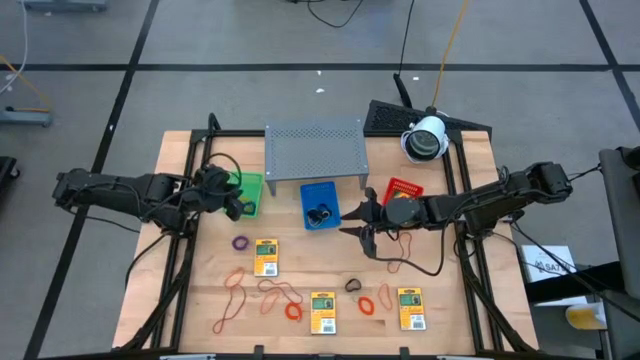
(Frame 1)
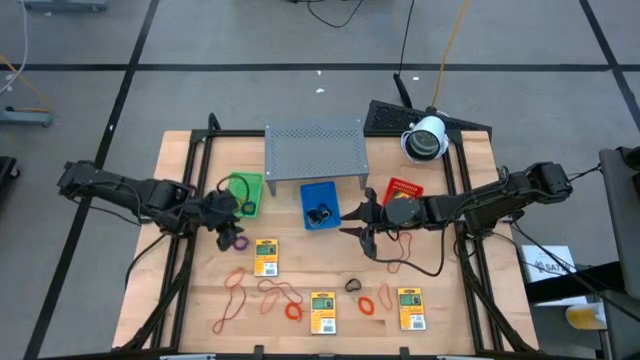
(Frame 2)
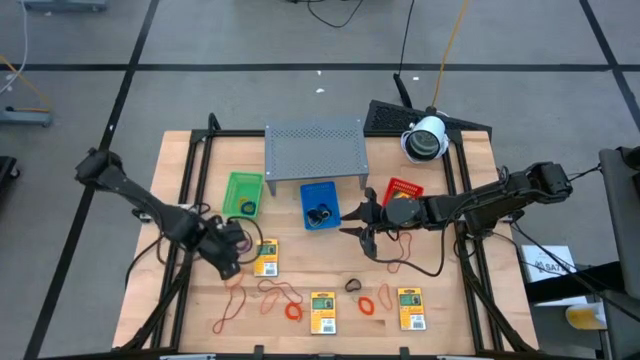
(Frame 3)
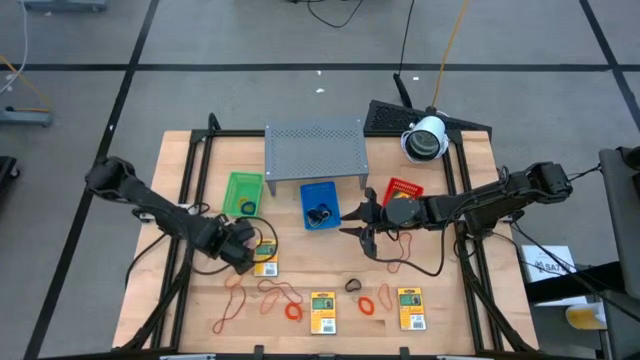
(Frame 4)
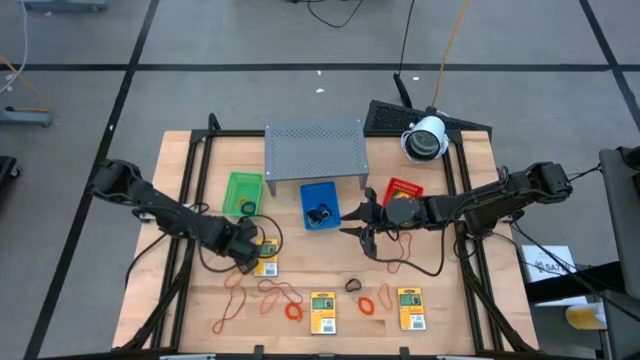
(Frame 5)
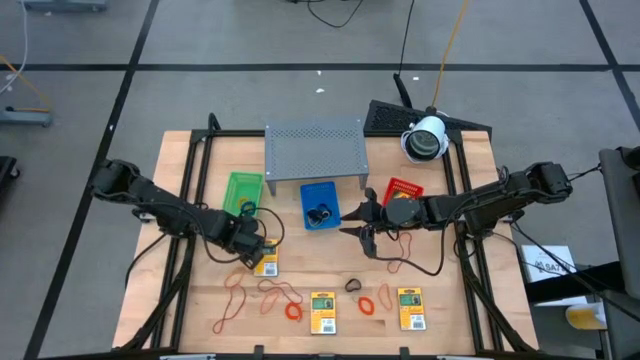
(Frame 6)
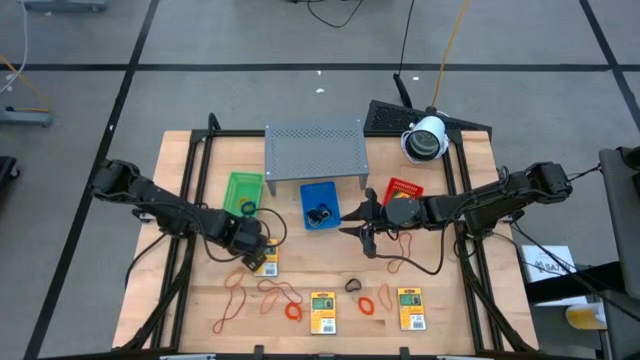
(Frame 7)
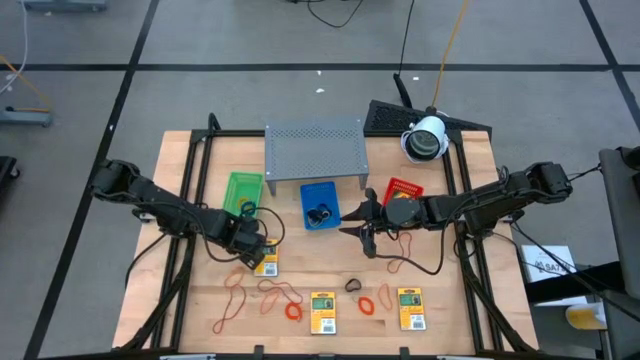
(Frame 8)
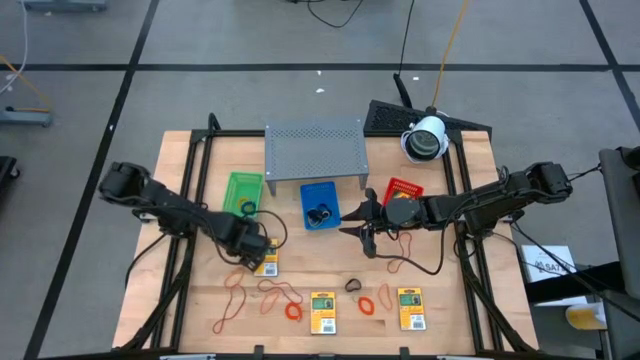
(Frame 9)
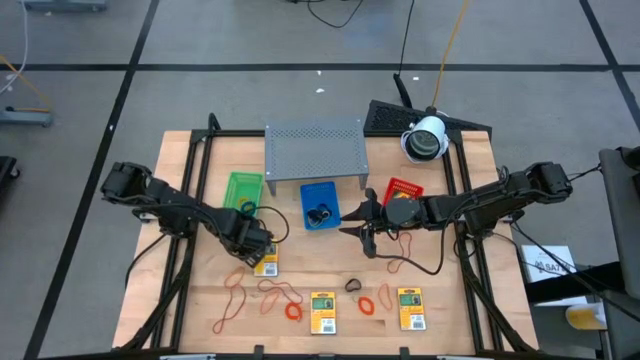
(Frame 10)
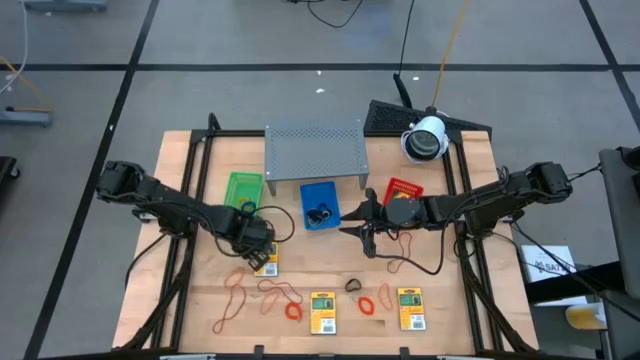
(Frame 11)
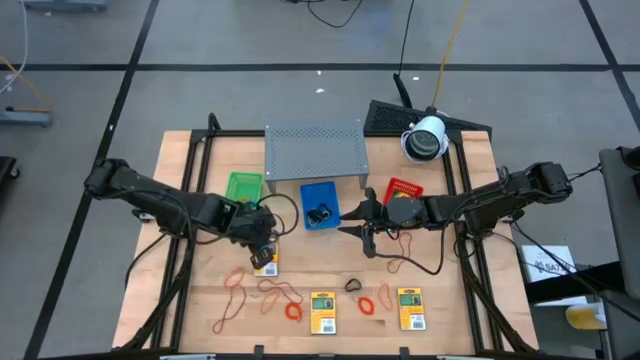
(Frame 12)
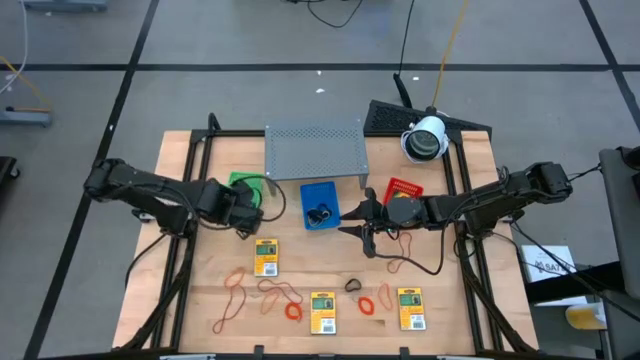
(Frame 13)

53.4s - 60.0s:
Task: Pick & Place Office Desk Supplies
Put the purple spring keychain into the green bin

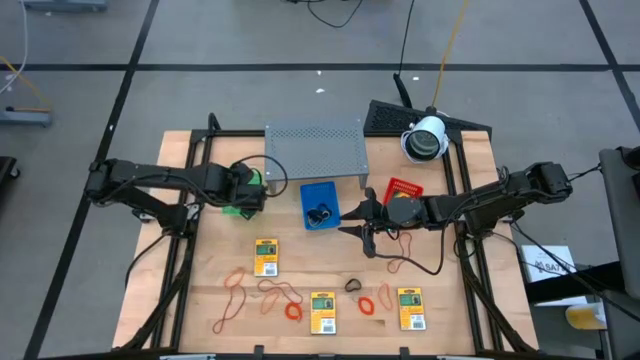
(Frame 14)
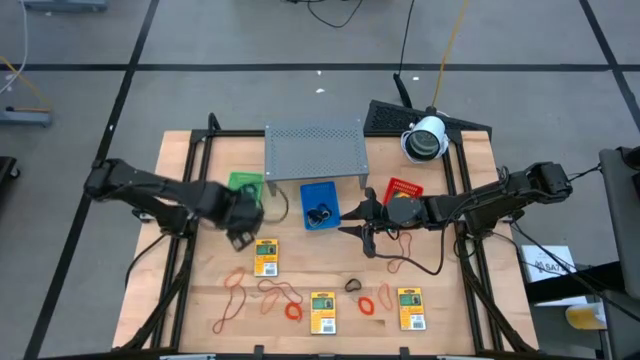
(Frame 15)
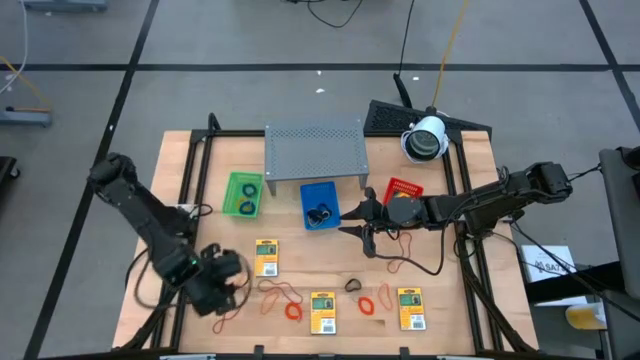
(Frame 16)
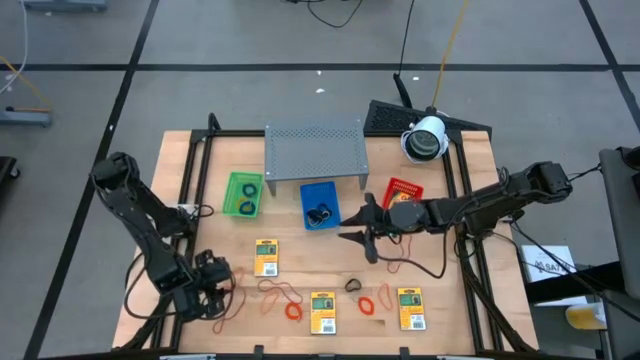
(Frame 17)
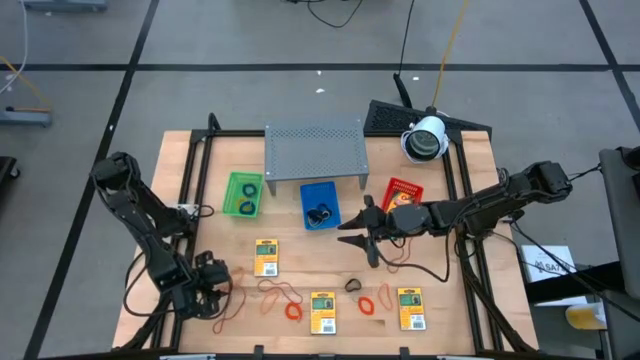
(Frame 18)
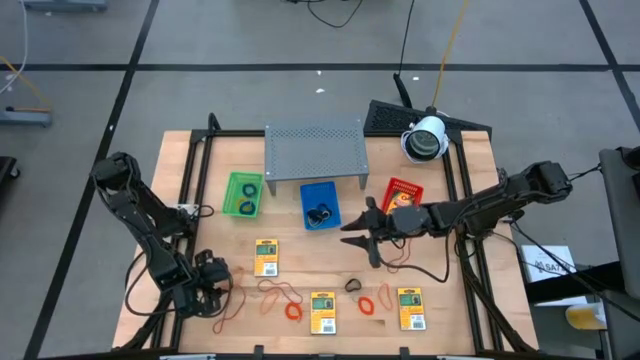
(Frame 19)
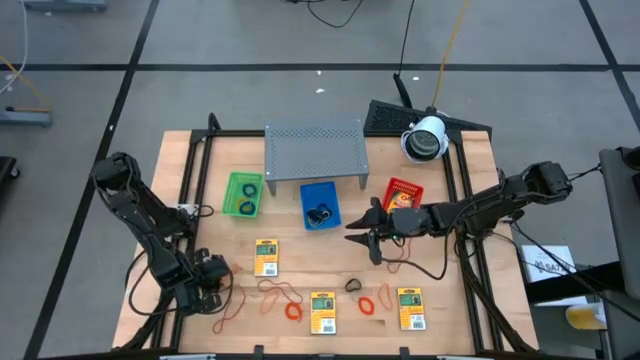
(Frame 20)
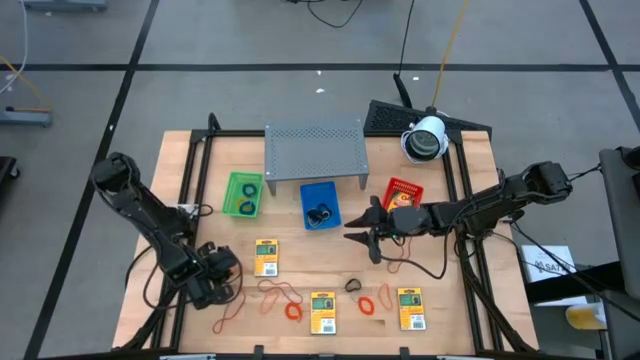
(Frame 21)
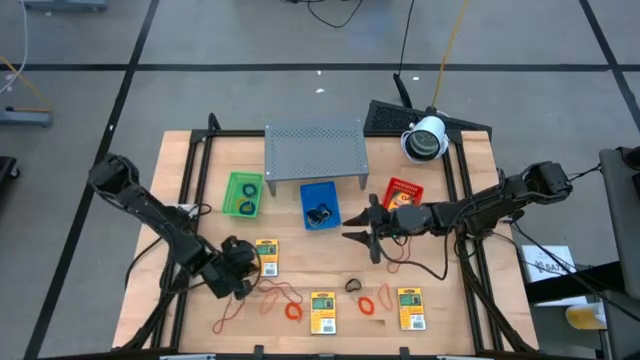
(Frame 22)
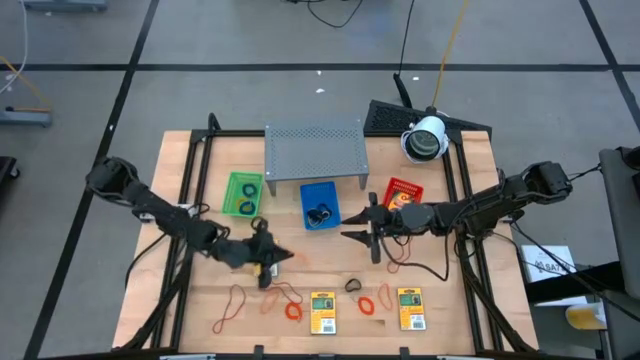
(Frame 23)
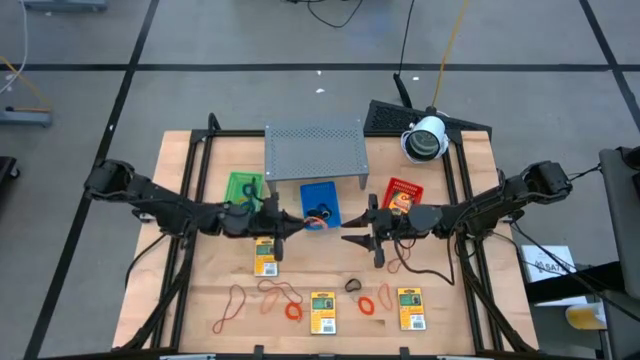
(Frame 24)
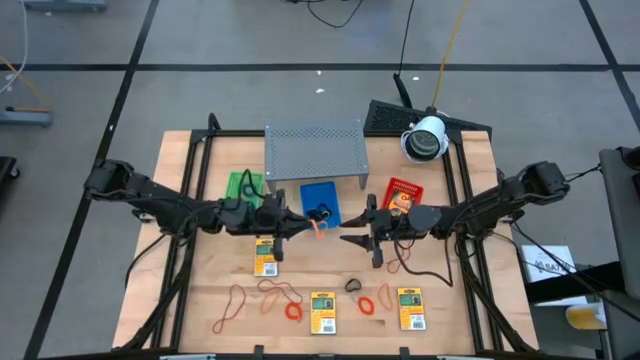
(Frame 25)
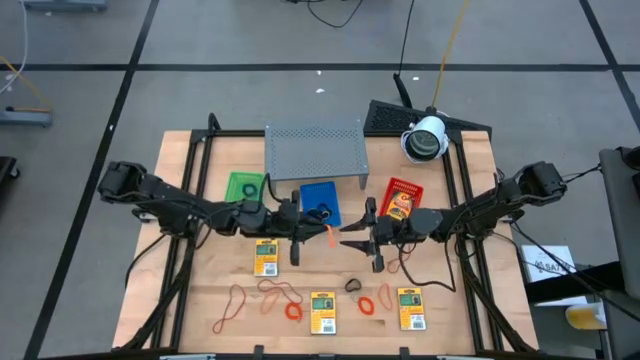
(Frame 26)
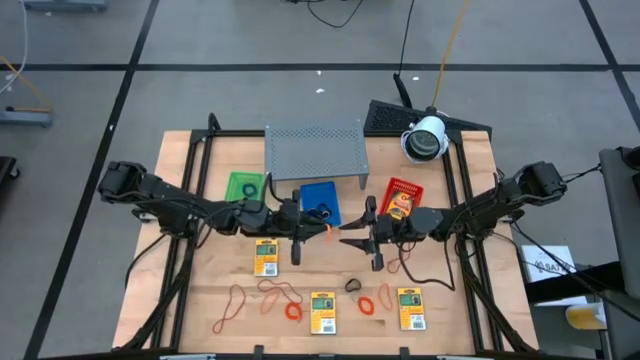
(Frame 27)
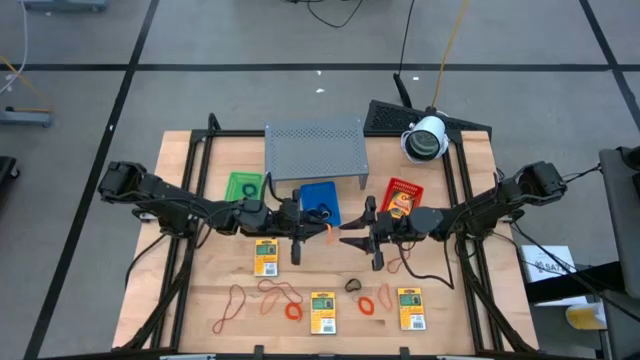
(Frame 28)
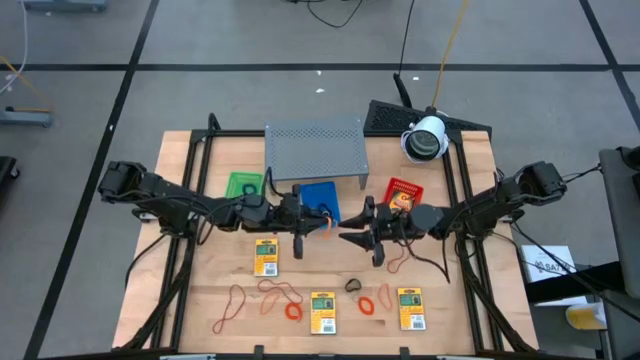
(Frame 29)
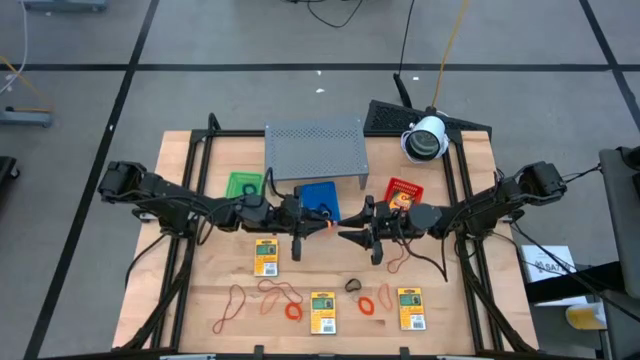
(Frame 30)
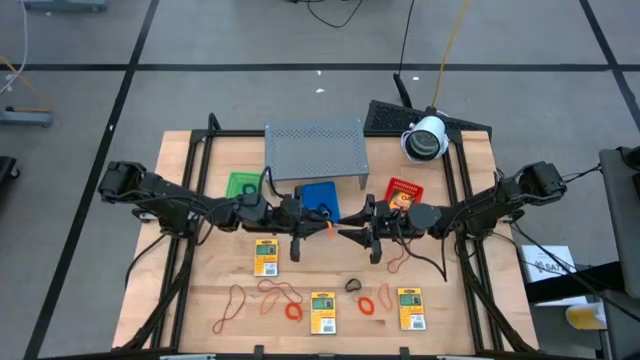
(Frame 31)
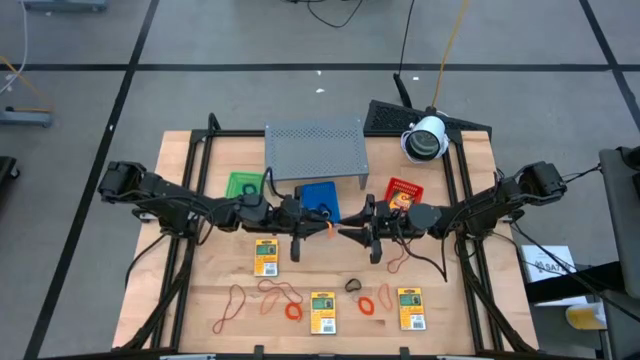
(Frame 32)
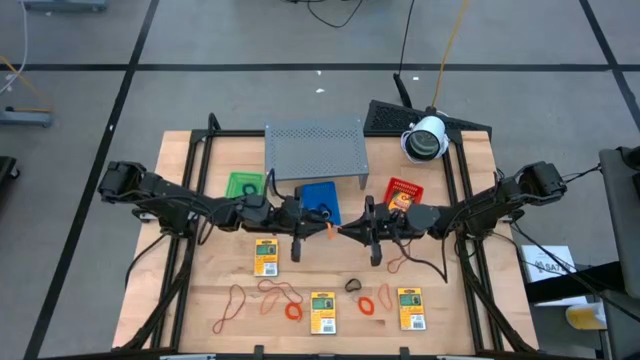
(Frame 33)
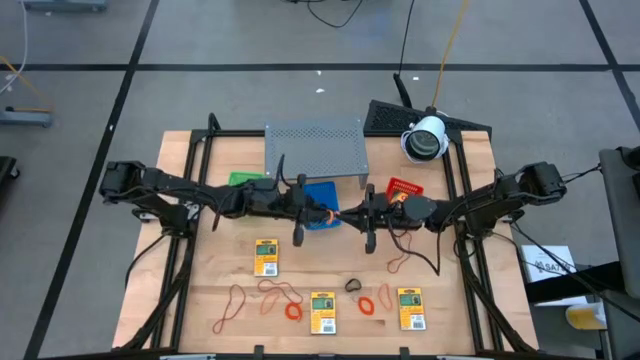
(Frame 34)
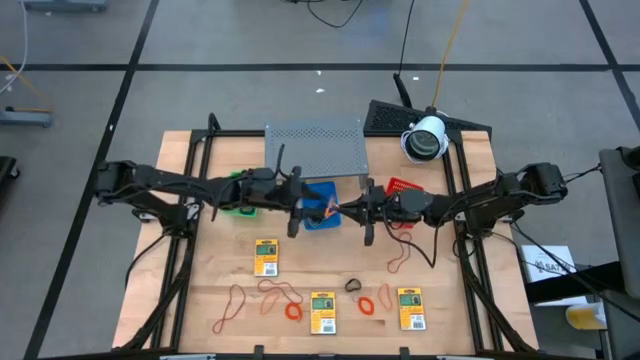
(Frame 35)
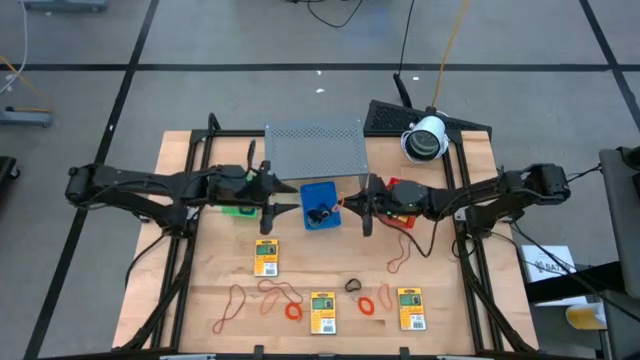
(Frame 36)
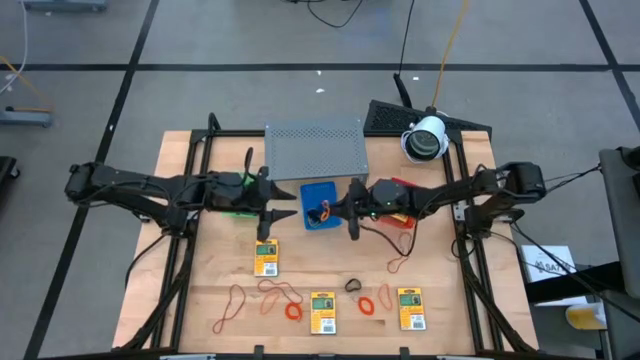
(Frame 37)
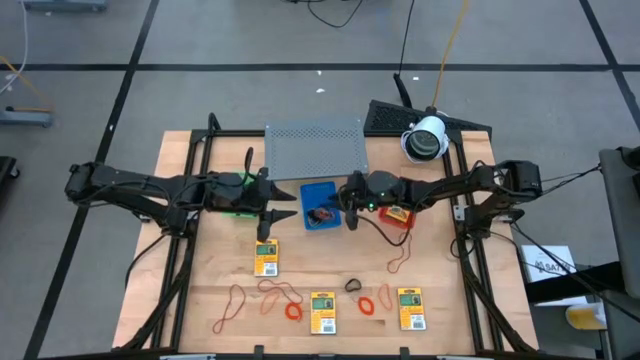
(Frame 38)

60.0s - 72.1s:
Put the orange rubber band into the blue bin

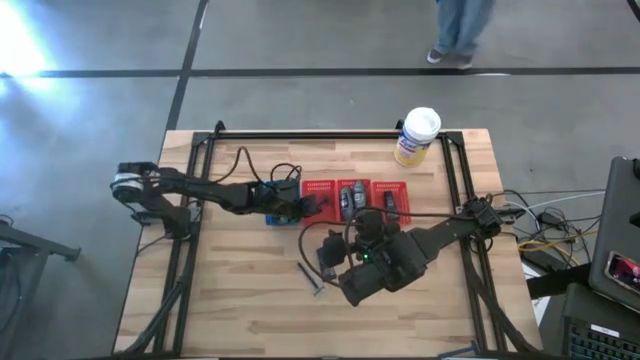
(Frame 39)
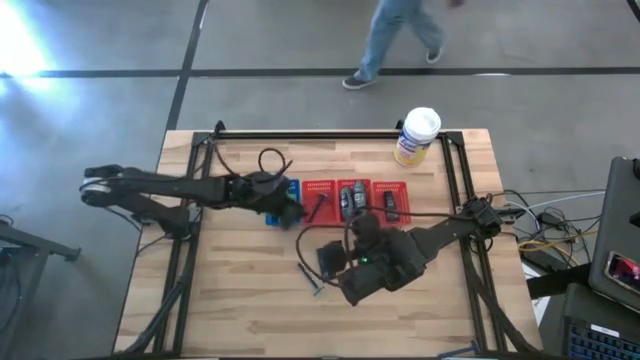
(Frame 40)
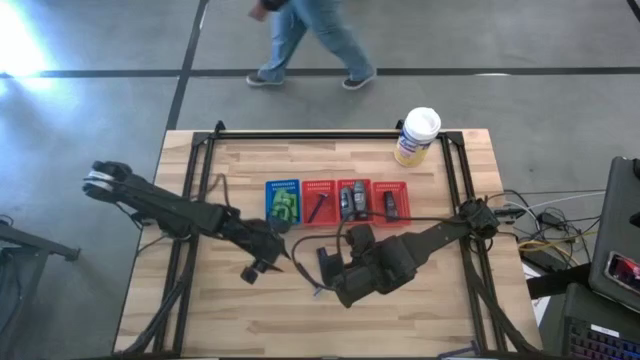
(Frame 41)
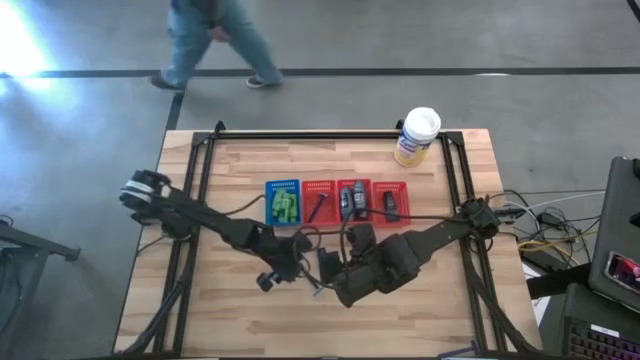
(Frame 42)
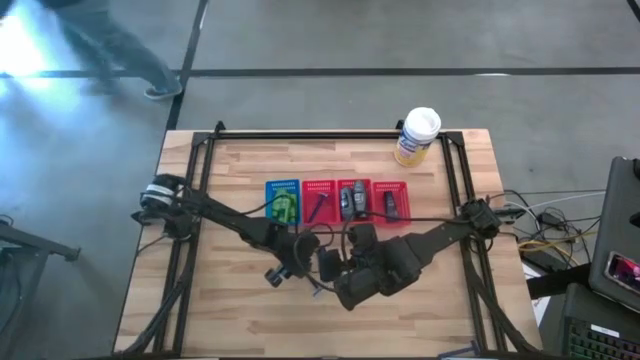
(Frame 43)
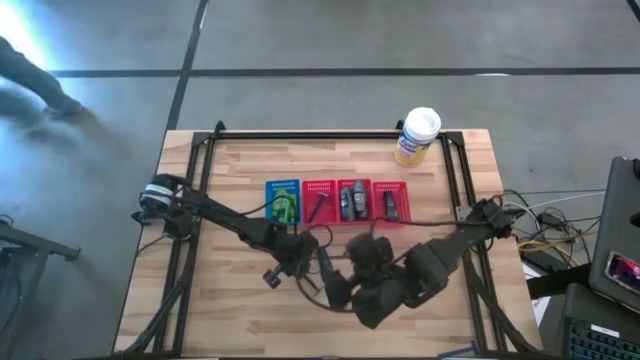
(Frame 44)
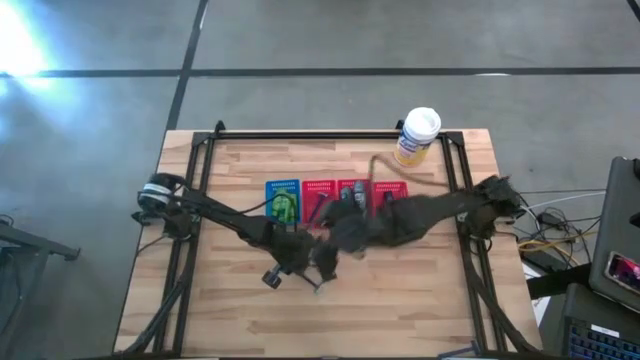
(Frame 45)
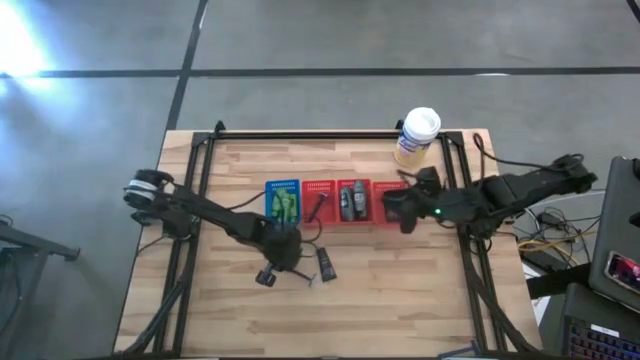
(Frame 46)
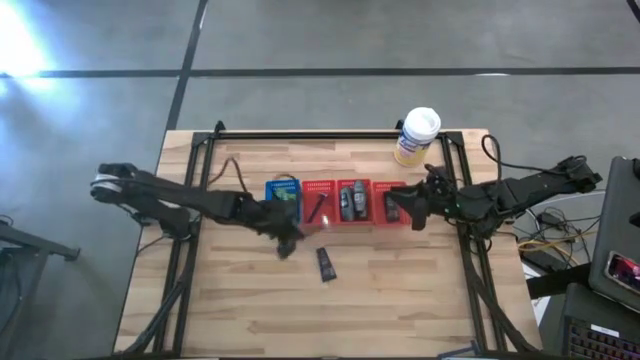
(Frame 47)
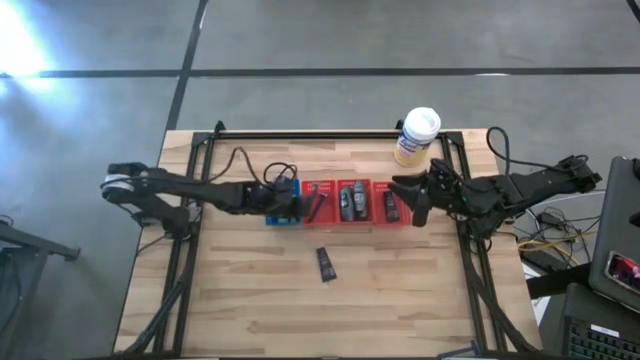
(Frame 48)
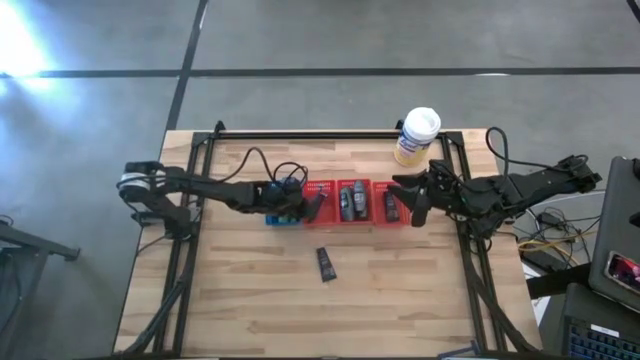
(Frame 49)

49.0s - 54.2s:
Task: Pick & Place Travel size toiletries
Put the blue razor into the left red bin
